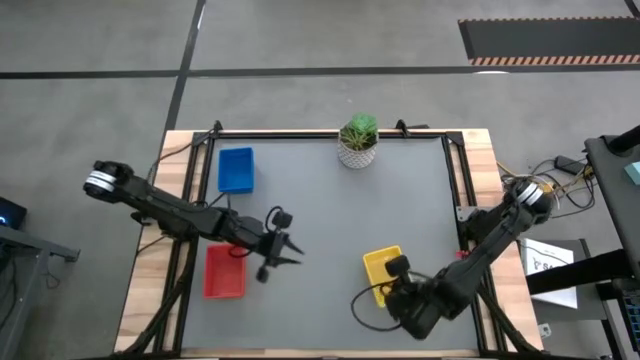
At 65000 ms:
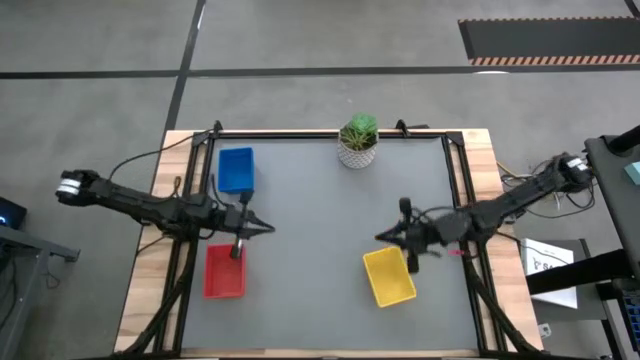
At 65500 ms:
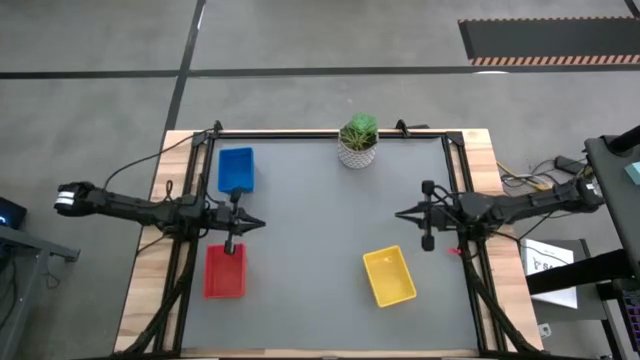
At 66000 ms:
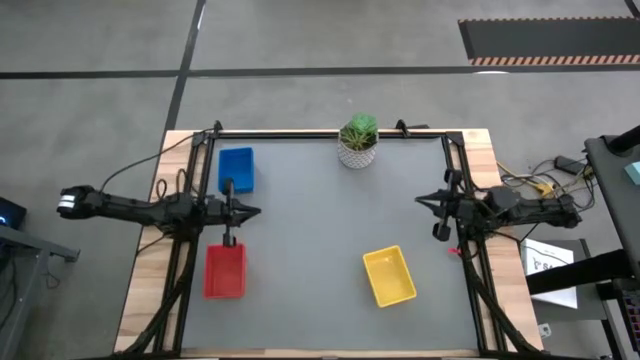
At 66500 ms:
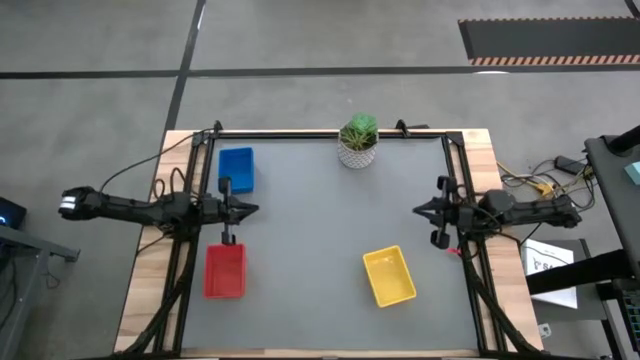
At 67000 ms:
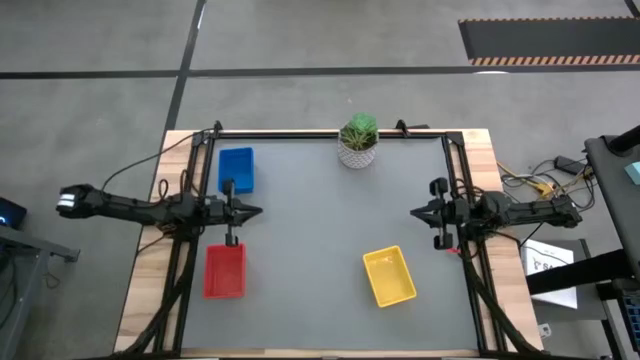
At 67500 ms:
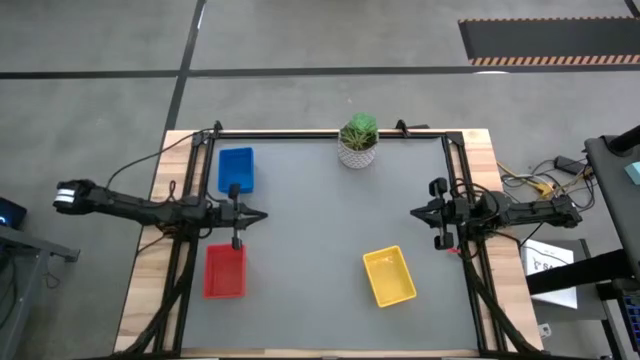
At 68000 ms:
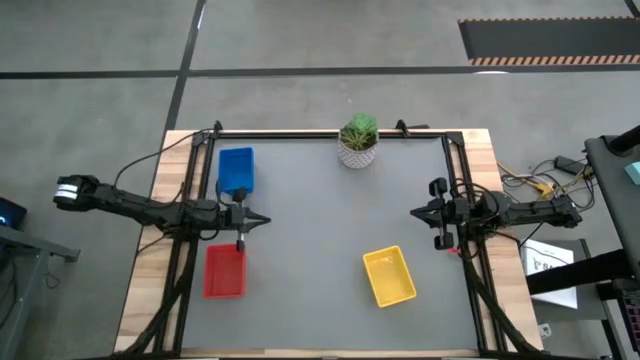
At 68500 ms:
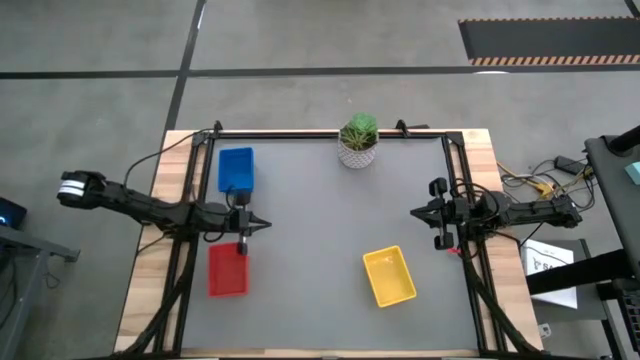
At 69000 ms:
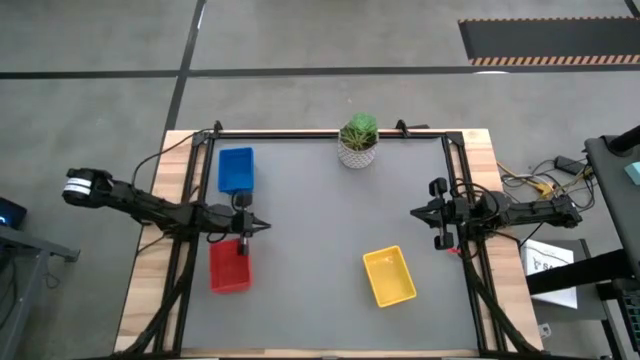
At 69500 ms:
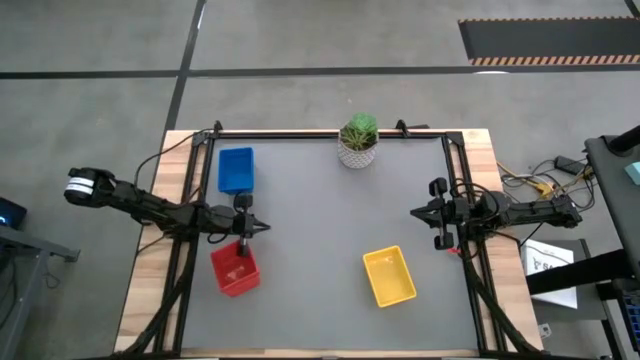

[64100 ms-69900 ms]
Return to Home Position

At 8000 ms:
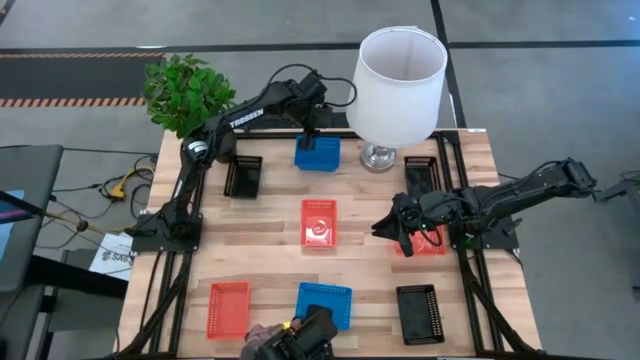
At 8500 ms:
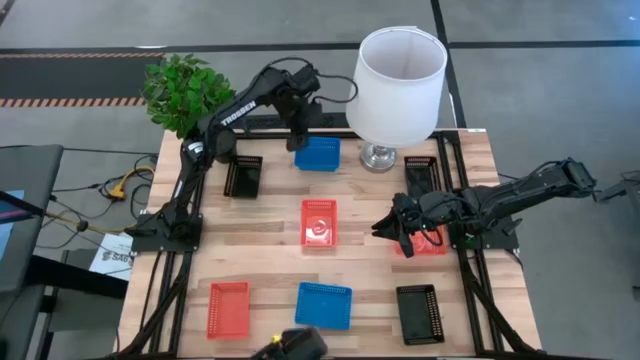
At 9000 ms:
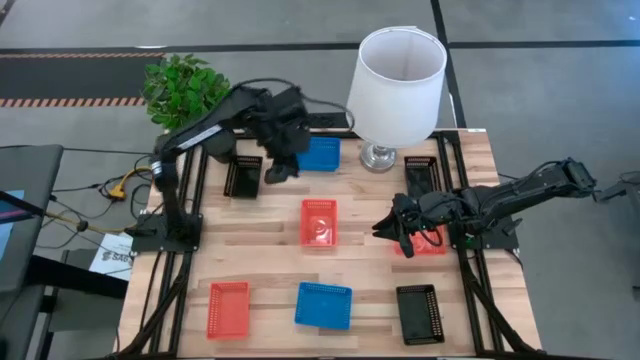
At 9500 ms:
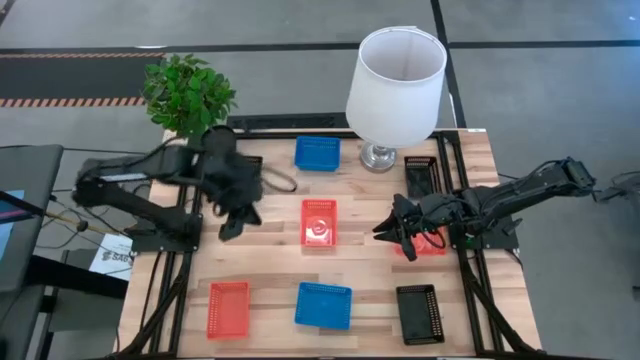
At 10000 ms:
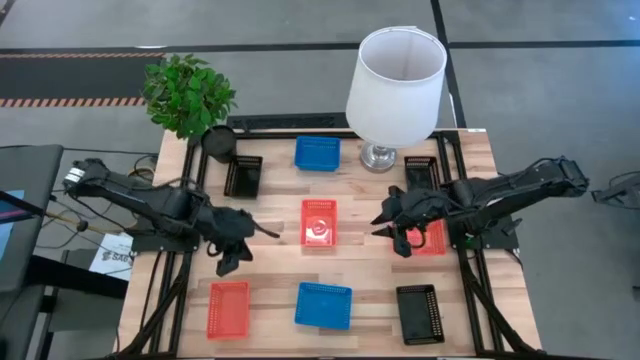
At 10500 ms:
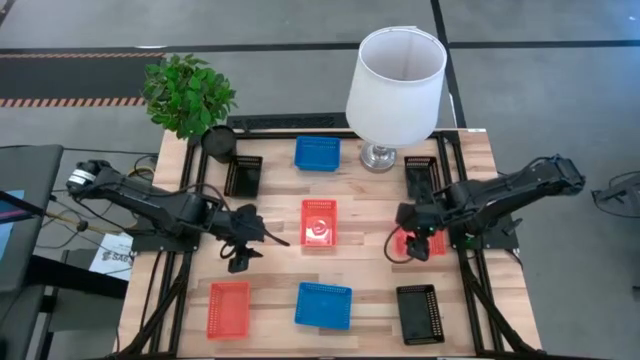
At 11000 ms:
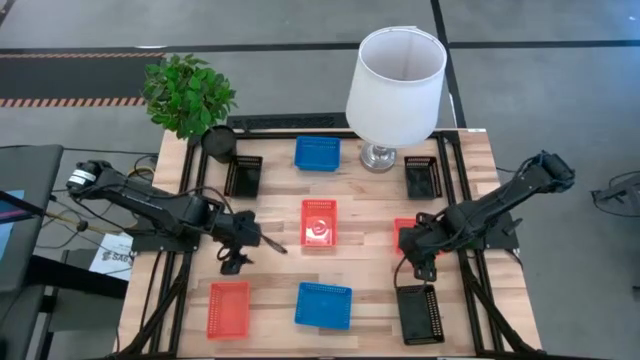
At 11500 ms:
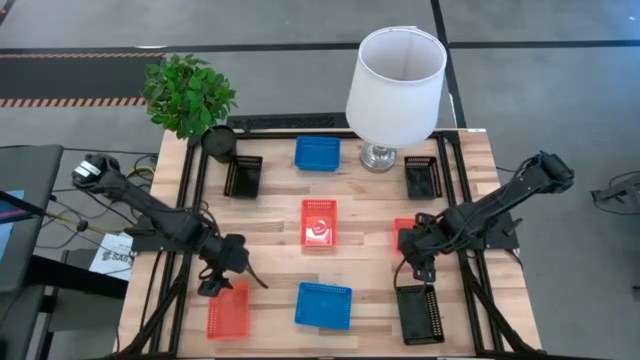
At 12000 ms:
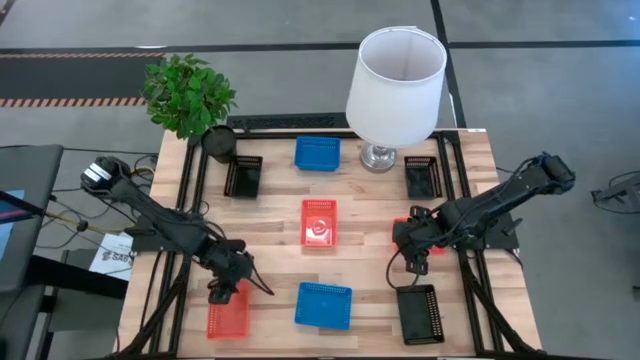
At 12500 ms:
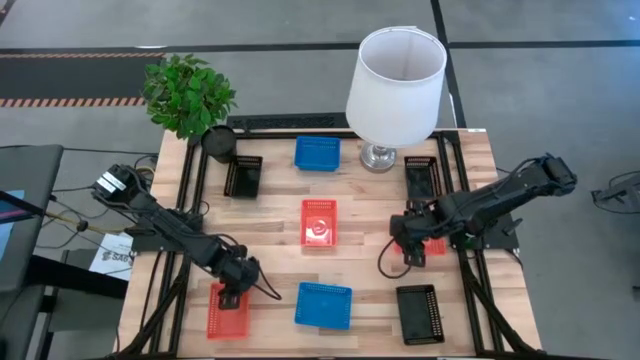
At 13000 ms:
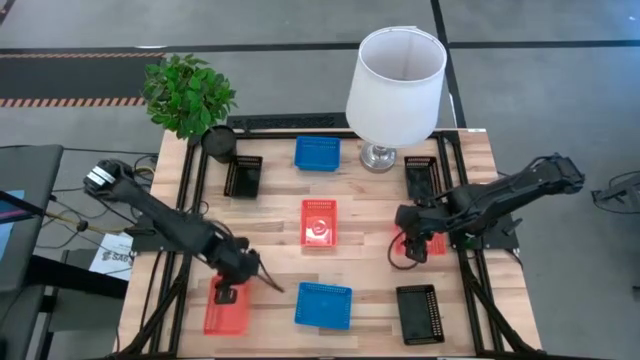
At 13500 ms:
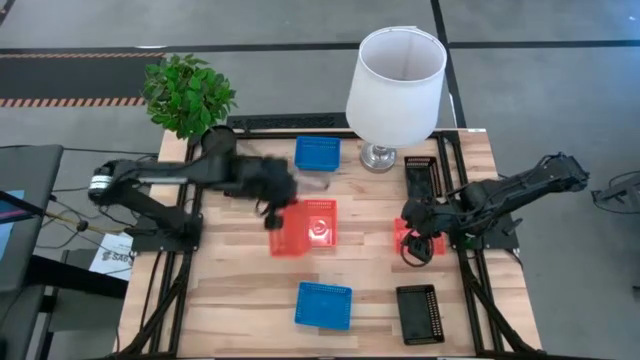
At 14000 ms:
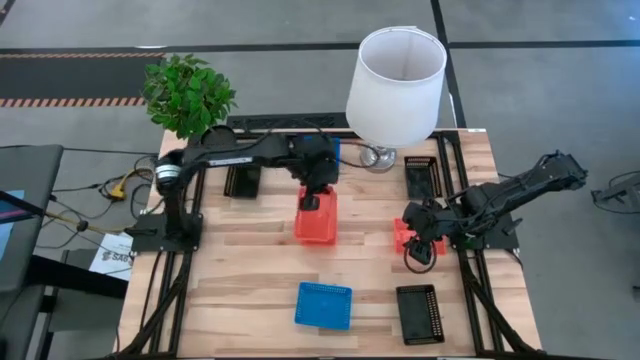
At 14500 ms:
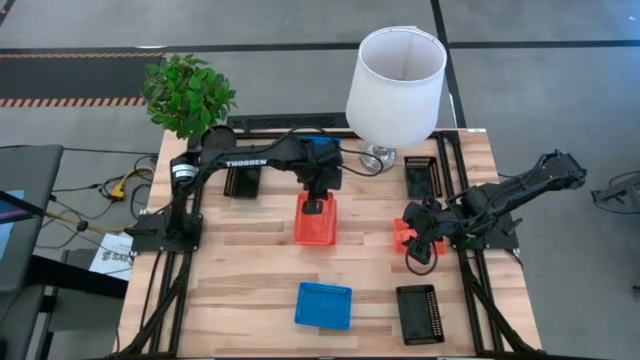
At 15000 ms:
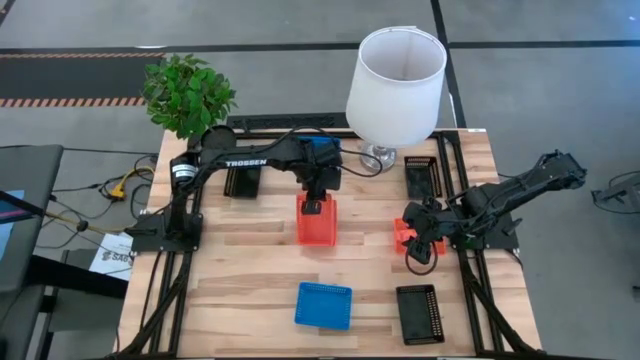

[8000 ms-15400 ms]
Stack the bottom orange bin on top of the center orange bin

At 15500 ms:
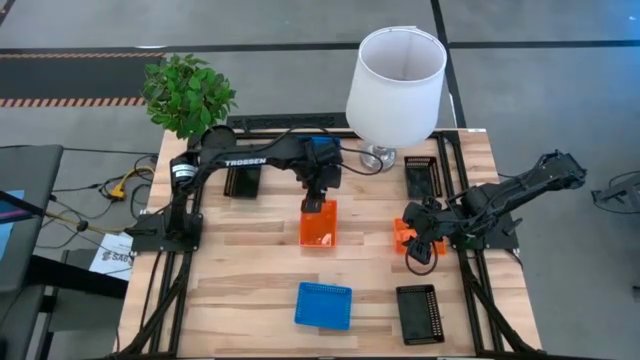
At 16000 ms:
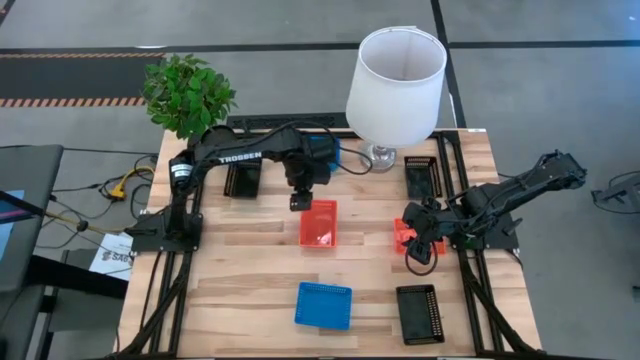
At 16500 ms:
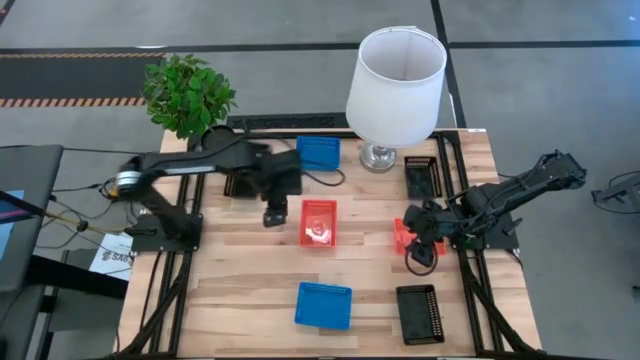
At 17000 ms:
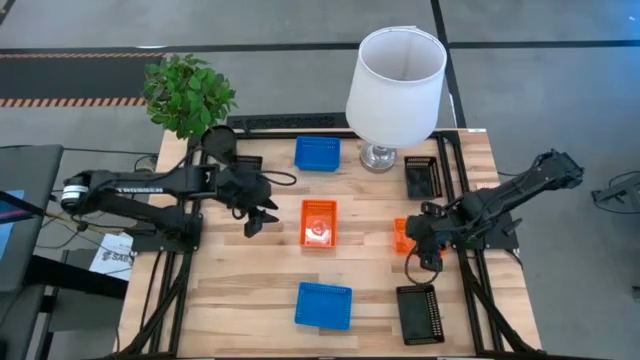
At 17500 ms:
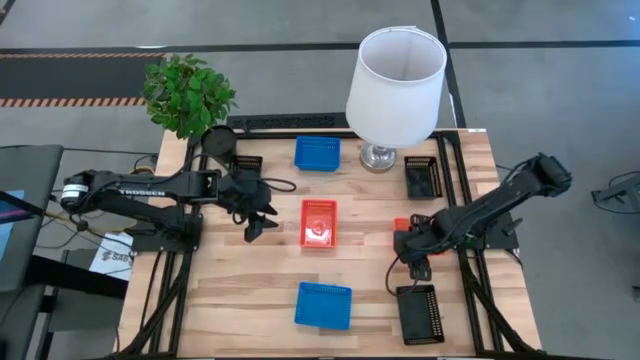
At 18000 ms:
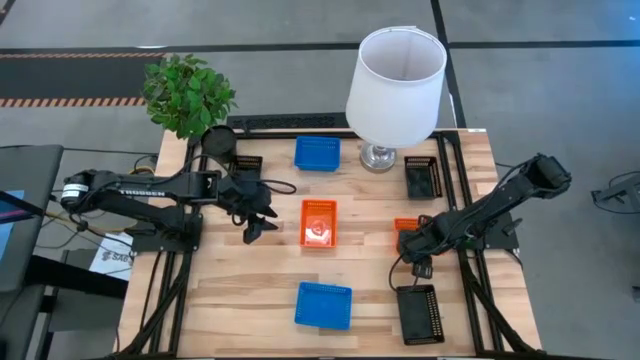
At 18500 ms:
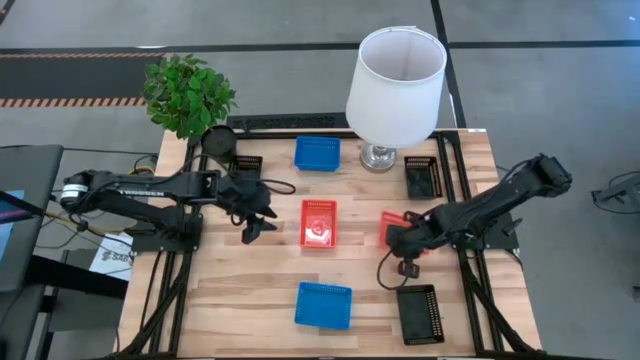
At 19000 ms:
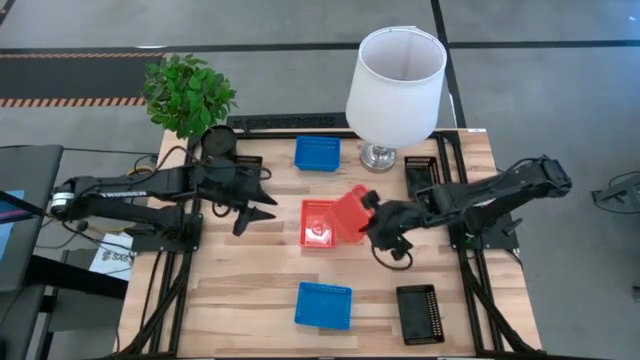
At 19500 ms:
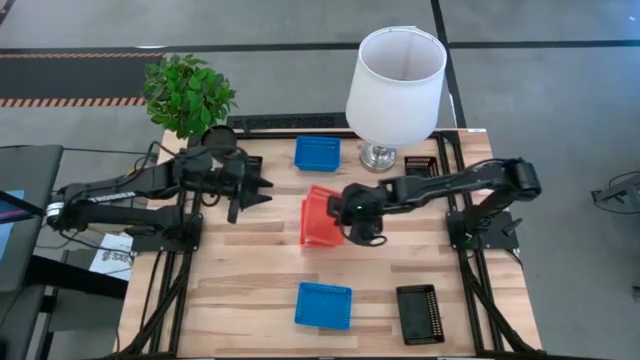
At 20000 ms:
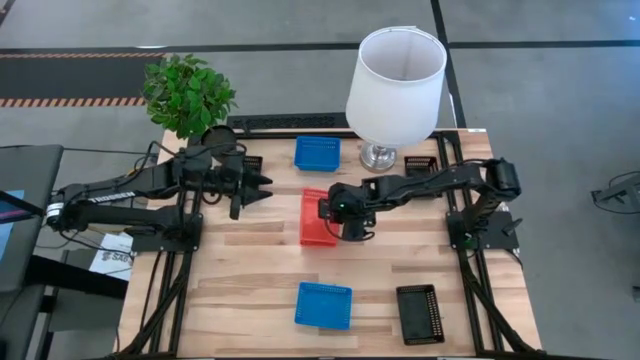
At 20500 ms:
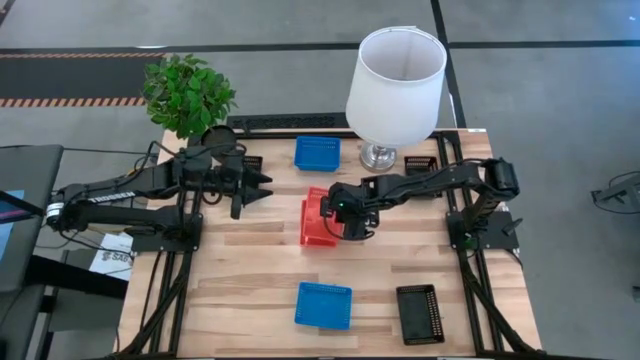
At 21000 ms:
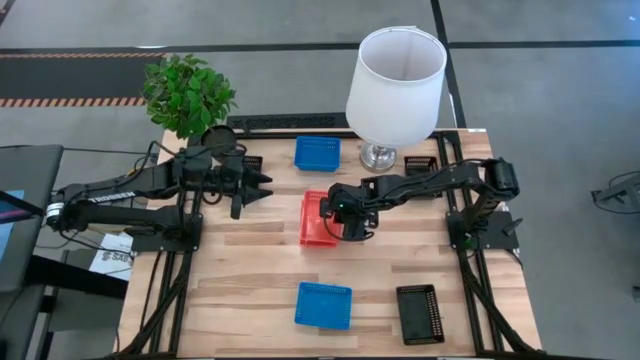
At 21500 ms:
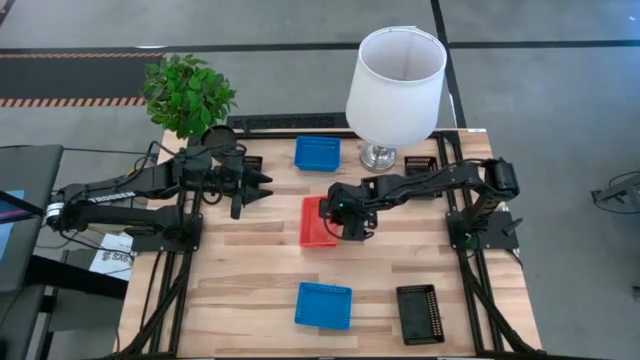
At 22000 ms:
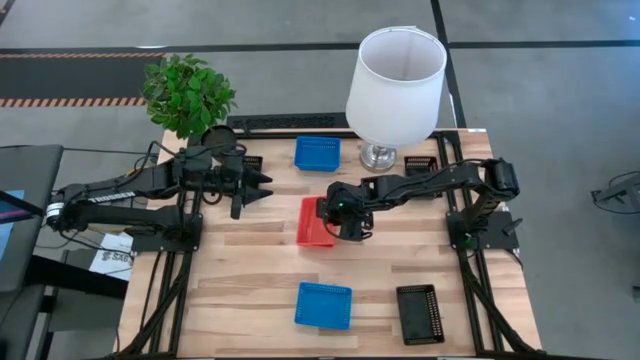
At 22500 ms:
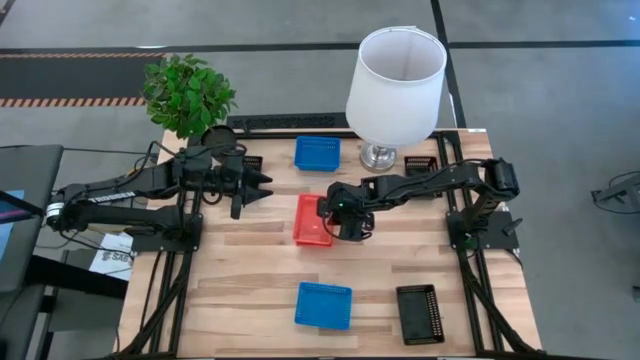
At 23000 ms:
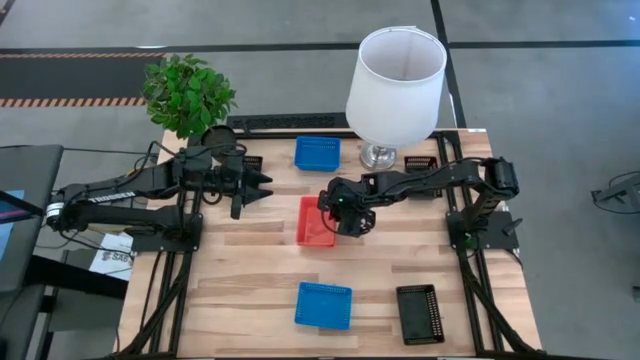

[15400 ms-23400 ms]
Stack the right orange bin on top of the center orange bin
